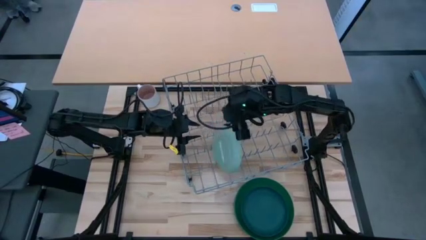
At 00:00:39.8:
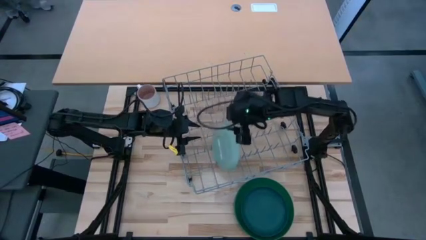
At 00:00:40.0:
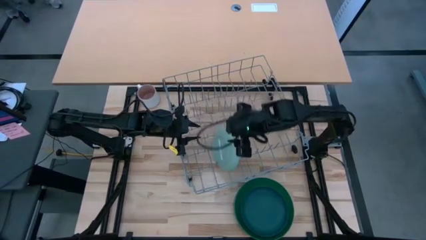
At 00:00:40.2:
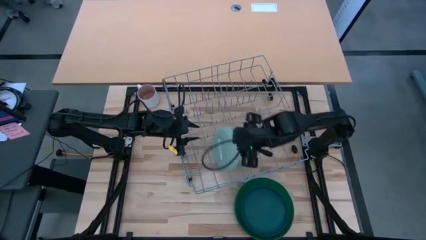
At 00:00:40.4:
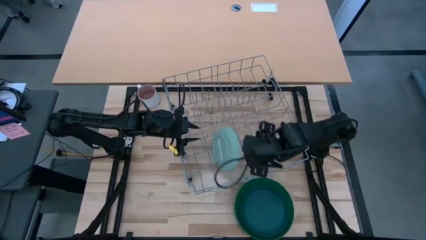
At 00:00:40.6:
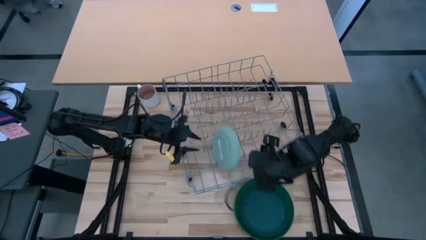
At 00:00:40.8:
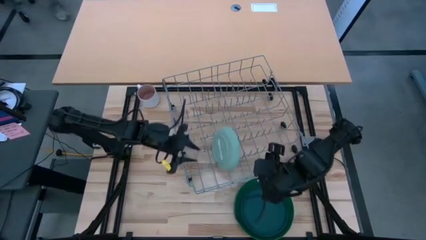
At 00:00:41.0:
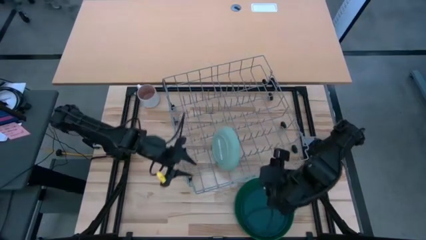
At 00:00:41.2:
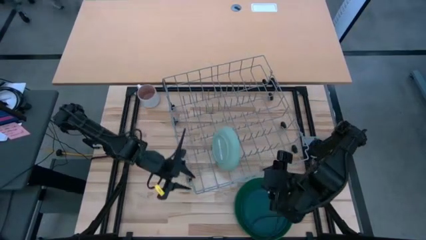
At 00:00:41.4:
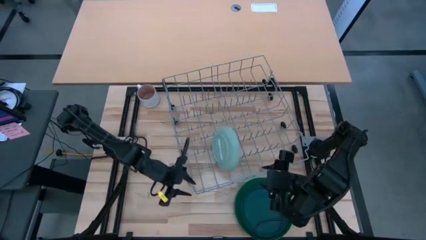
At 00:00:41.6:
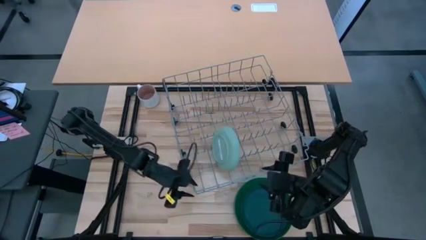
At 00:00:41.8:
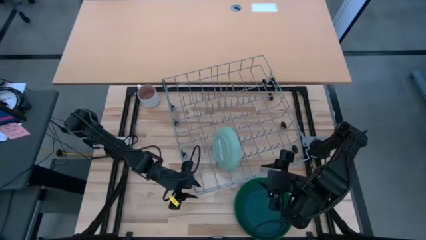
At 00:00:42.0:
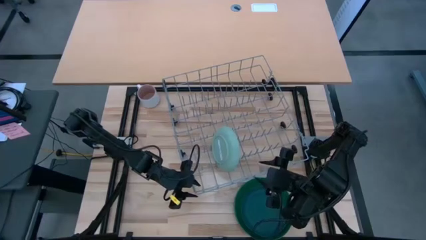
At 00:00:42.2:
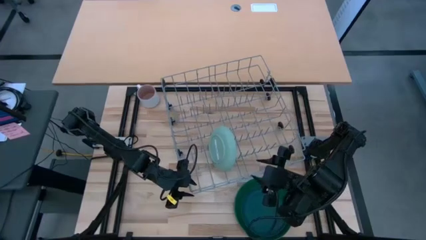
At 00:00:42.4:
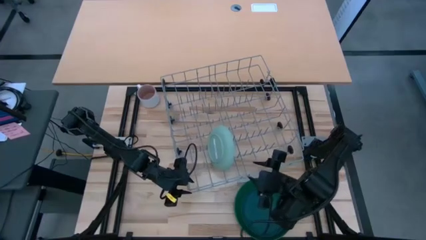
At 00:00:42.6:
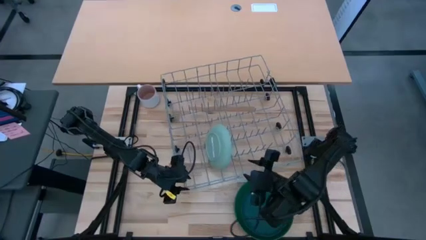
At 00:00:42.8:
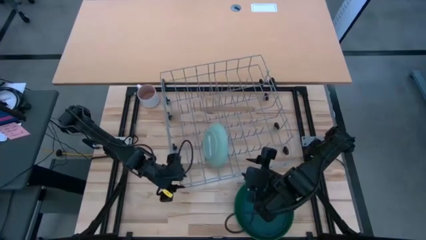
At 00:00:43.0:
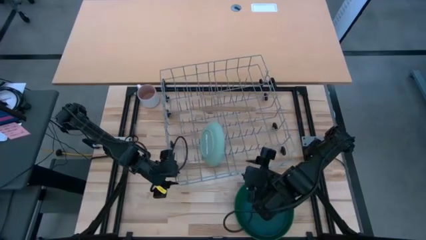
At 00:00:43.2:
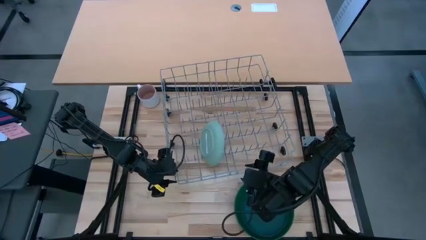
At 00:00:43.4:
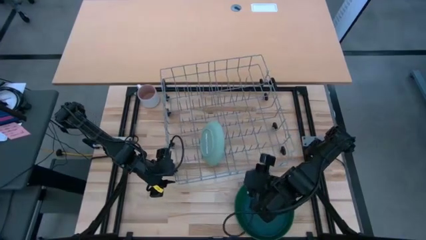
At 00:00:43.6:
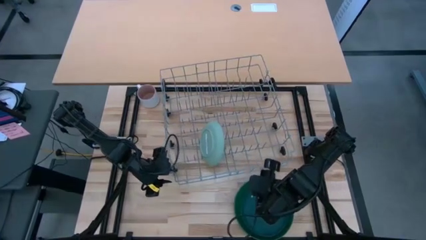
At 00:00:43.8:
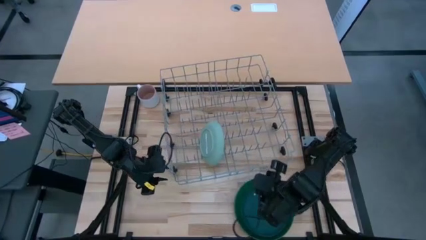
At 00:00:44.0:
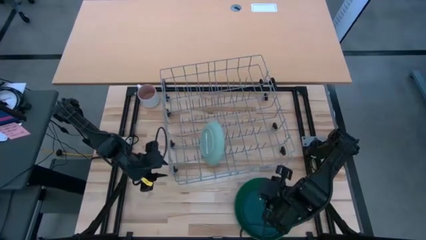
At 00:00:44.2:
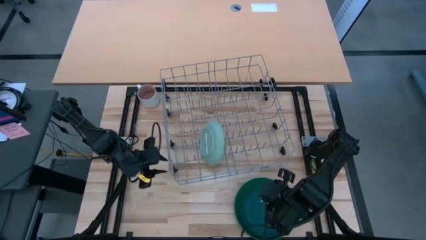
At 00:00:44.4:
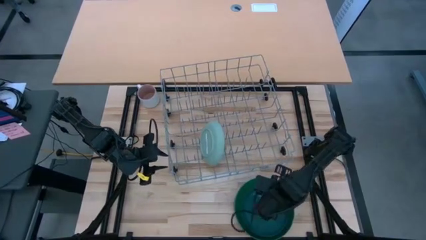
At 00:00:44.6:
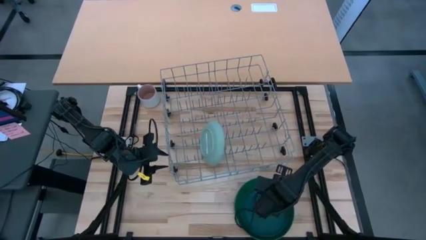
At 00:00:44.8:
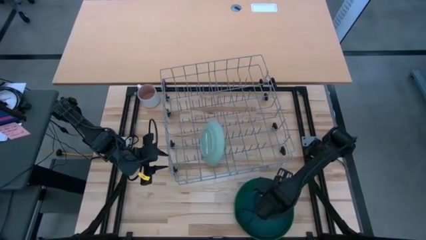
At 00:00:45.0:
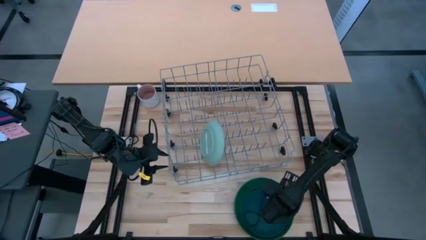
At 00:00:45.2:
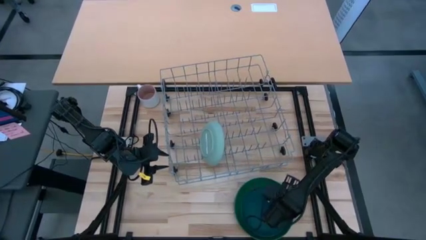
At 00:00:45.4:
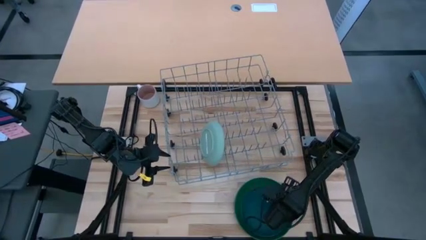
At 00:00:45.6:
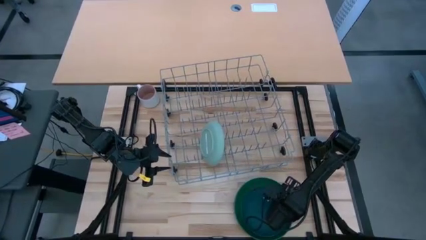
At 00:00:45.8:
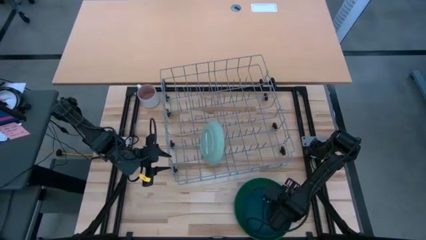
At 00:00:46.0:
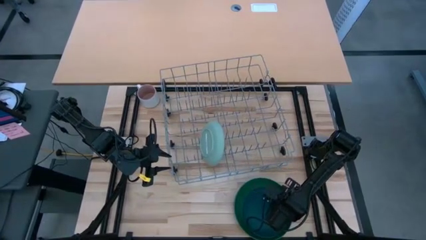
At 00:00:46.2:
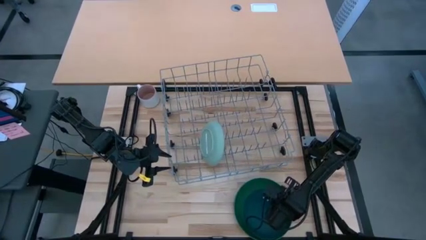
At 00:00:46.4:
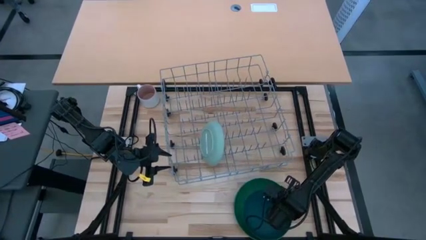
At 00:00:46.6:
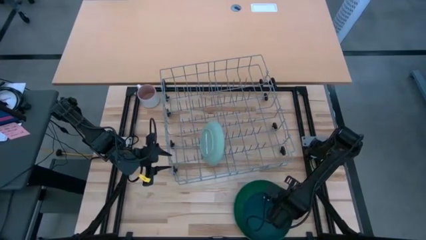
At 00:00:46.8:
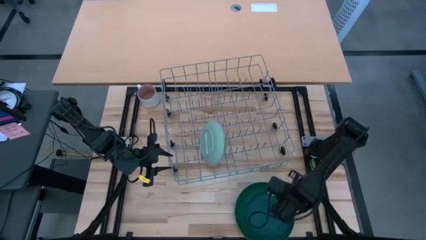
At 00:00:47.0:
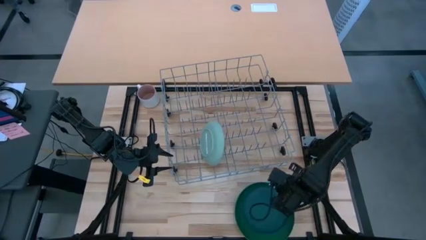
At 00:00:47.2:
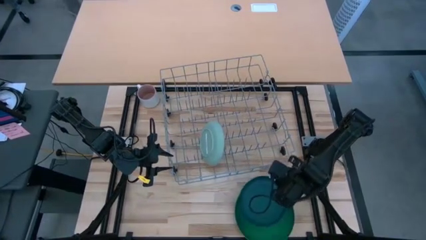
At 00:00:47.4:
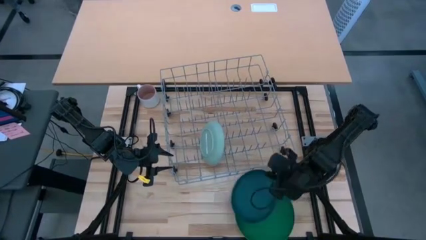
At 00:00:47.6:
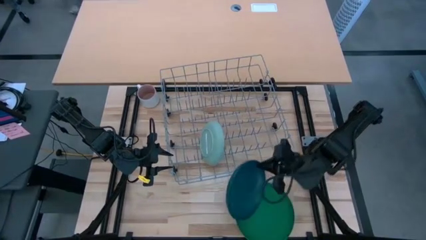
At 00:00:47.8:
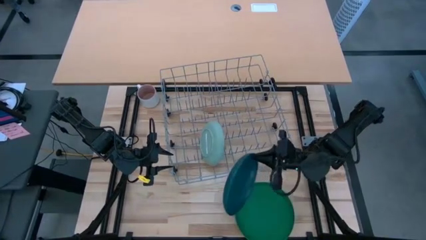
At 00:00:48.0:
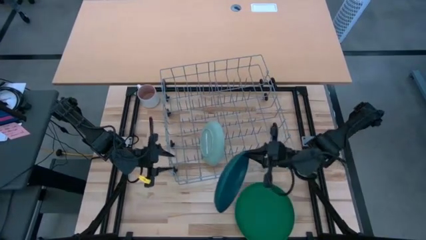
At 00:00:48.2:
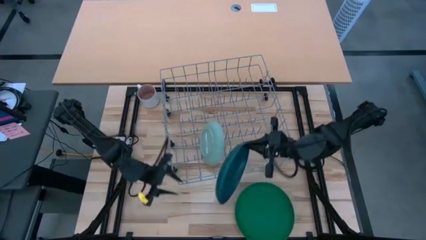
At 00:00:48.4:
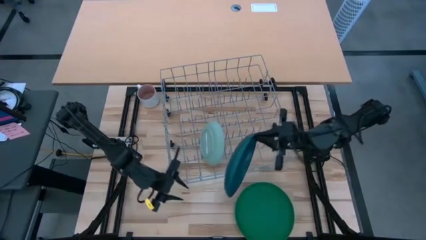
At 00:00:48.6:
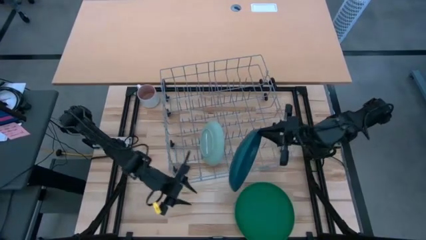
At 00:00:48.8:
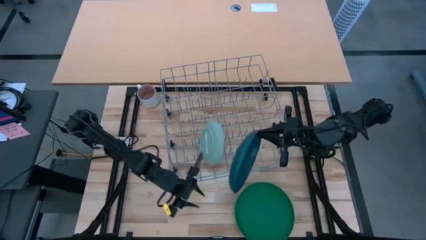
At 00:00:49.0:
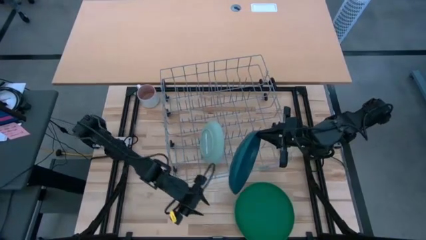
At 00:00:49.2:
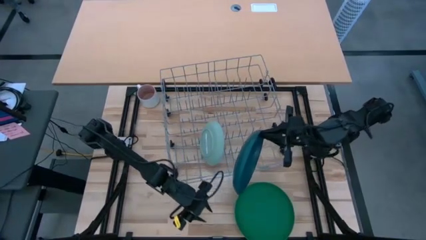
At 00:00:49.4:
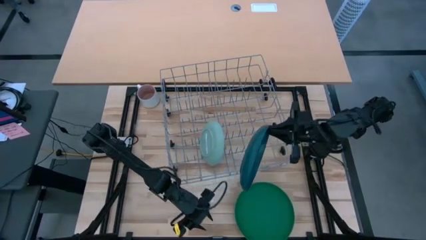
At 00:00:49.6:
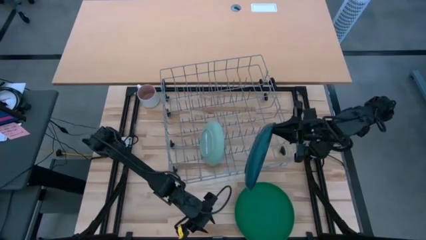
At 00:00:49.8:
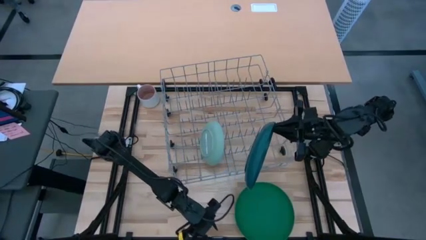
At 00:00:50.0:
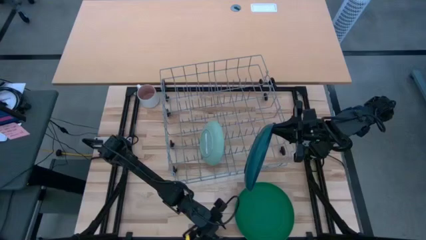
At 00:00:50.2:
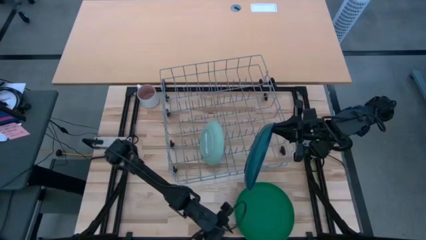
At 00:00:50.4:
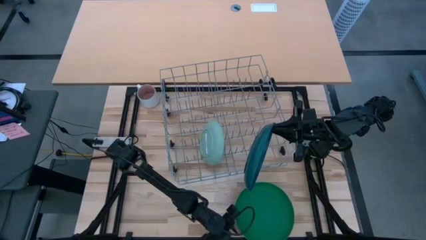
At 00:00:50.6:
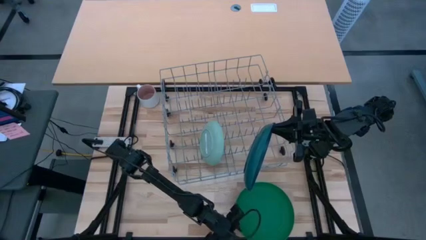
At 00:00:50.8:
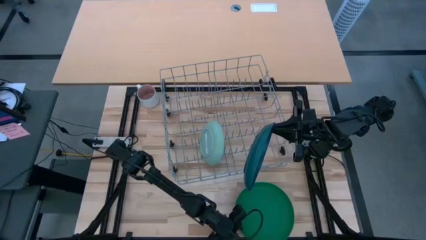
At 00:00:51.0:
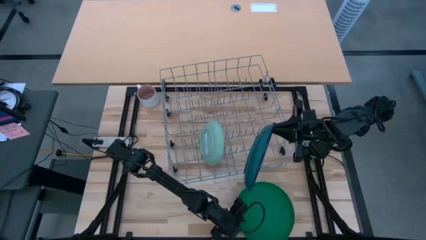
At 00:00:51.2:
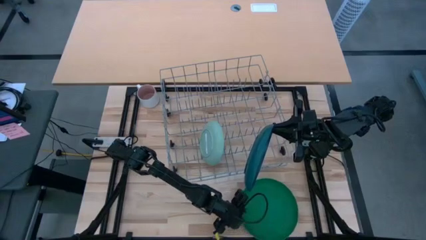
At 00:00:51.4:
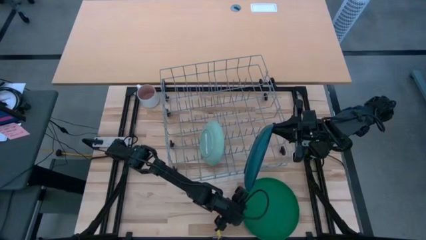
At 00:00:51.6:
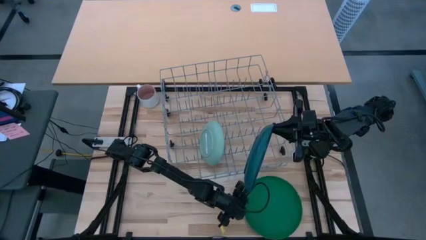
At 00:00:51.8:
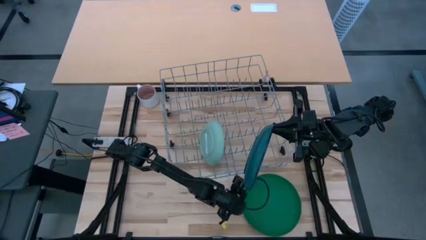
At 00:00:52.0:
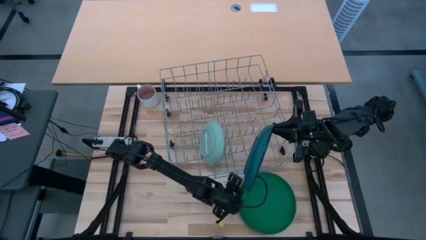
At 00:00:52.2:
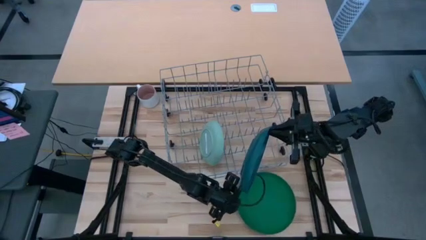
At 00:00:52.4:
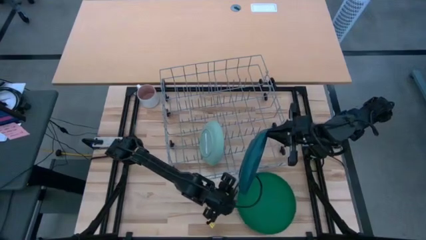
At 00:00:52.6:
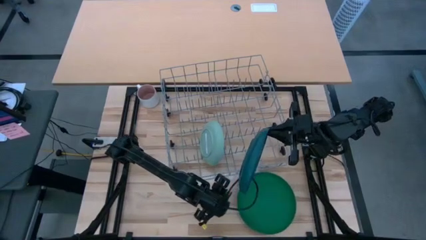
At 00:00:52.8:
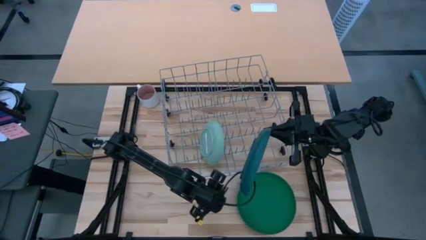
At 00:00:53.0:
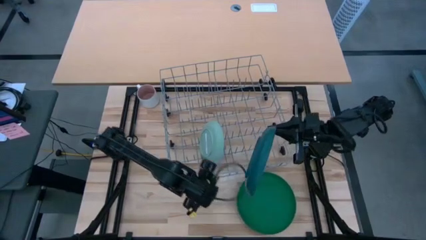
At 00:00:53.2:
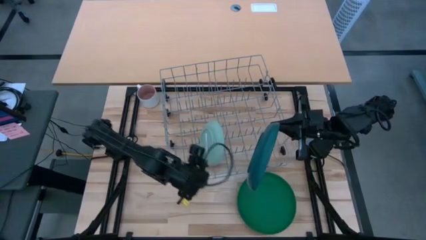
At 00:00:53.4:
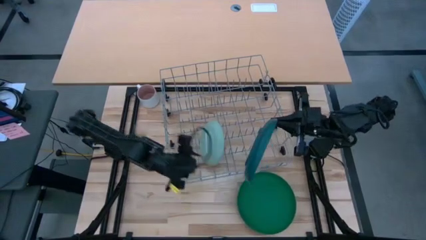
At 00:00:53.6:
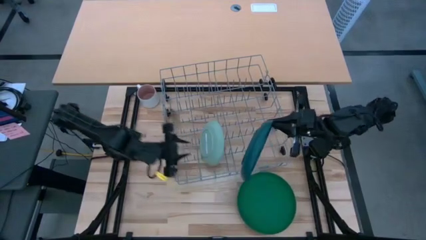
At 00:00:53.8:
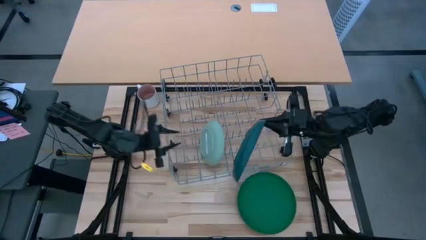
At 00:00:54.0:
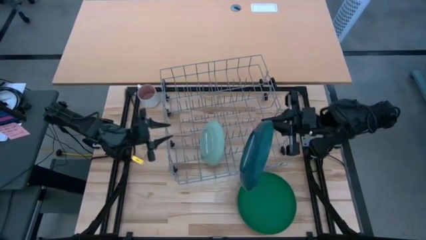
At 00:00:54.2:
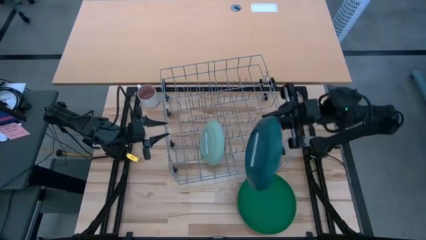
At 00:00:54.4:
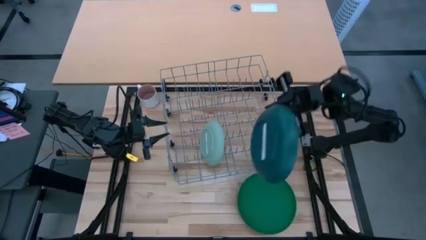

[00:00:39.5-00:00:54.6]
Task: Sort dishes
Put the dark blue plate in the dish rack
